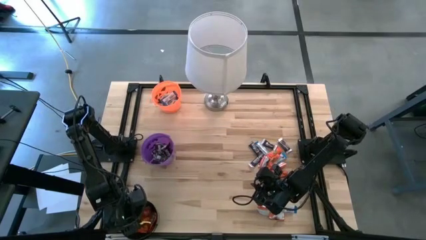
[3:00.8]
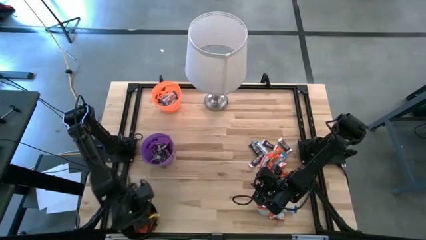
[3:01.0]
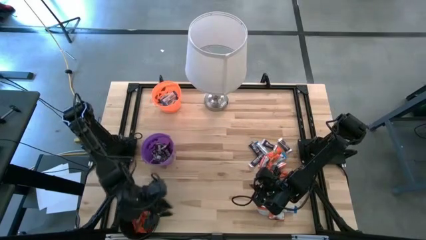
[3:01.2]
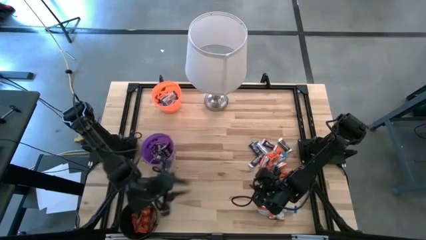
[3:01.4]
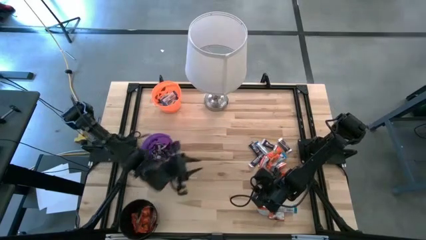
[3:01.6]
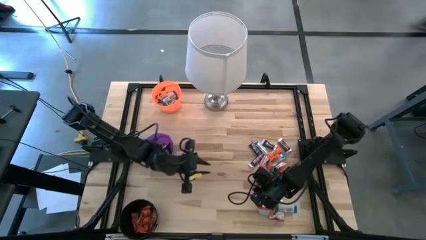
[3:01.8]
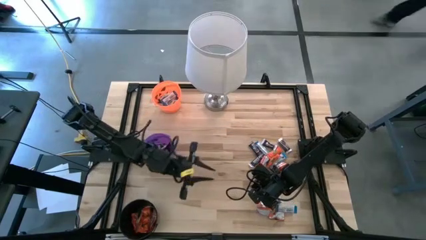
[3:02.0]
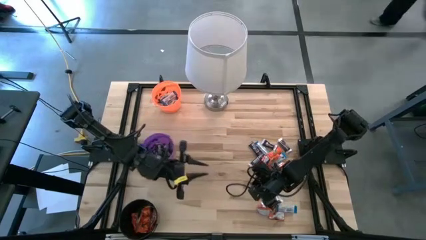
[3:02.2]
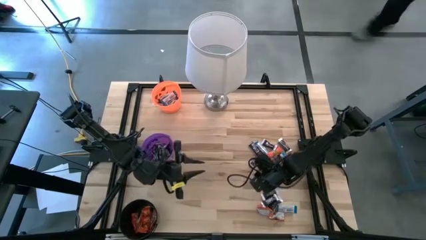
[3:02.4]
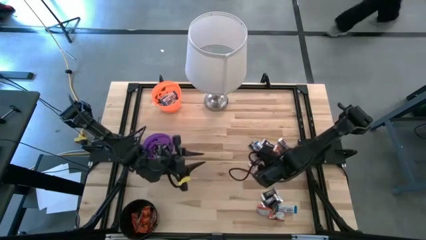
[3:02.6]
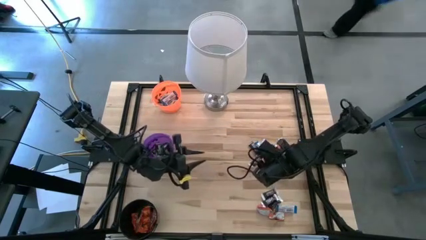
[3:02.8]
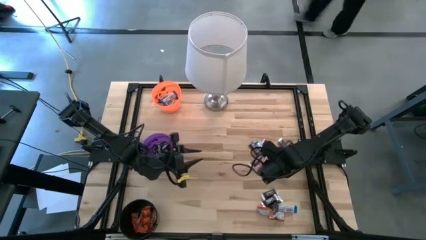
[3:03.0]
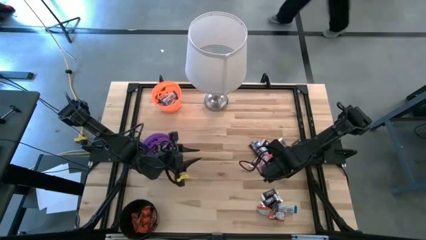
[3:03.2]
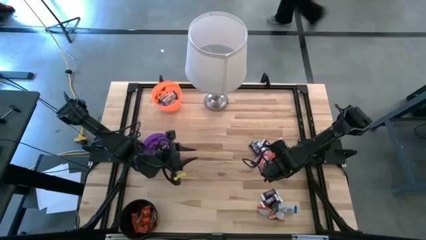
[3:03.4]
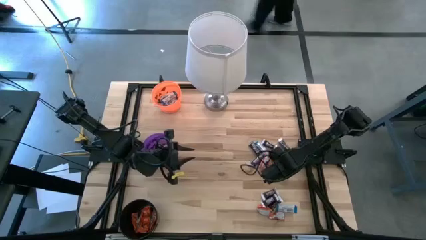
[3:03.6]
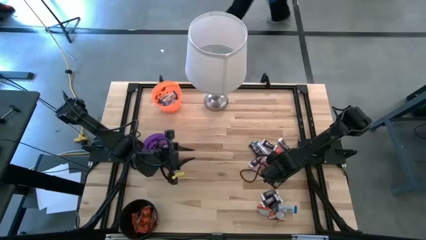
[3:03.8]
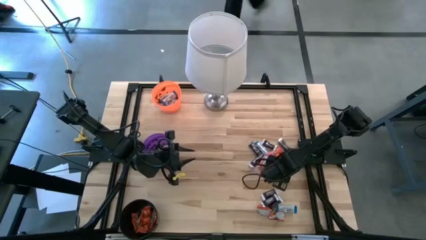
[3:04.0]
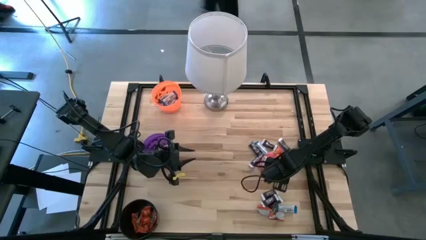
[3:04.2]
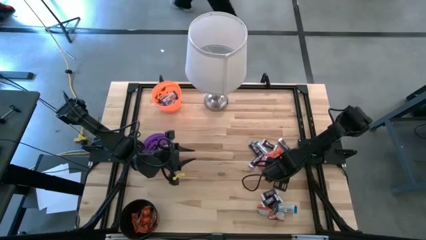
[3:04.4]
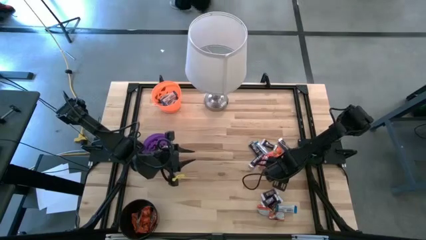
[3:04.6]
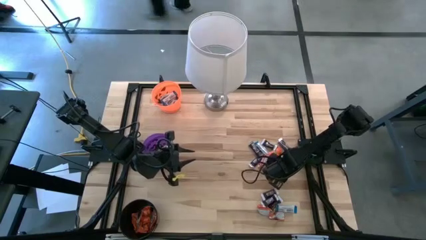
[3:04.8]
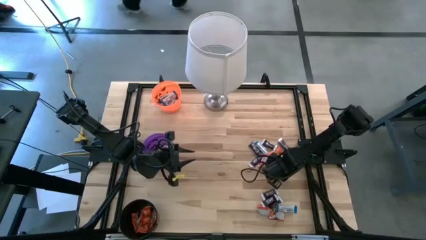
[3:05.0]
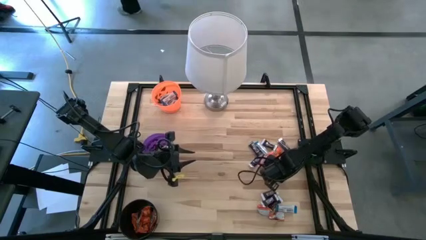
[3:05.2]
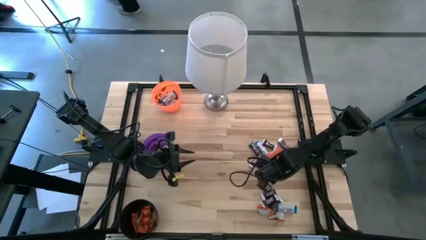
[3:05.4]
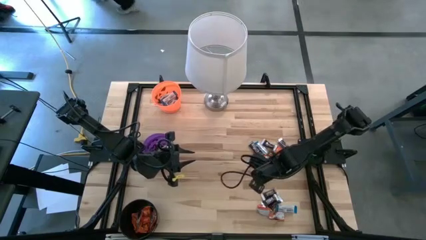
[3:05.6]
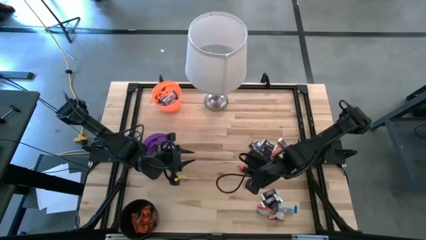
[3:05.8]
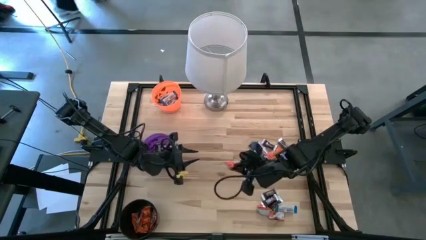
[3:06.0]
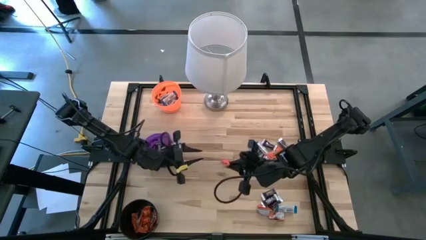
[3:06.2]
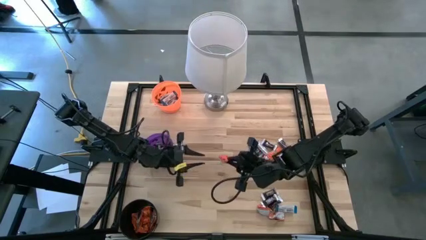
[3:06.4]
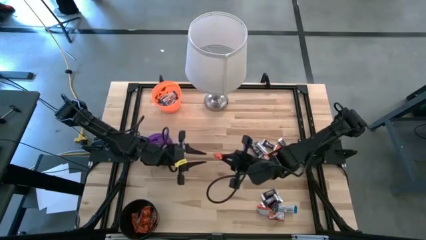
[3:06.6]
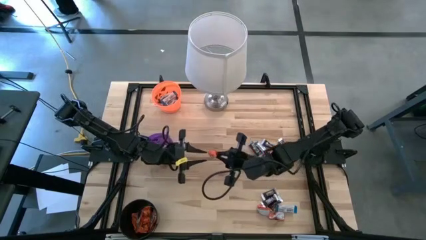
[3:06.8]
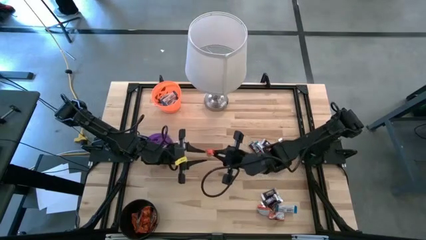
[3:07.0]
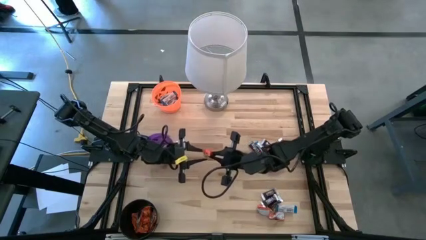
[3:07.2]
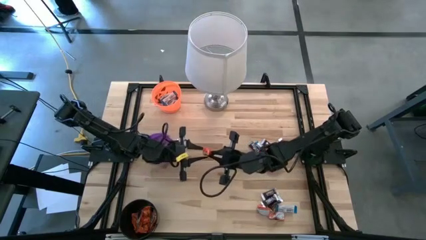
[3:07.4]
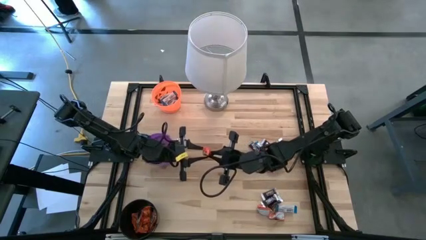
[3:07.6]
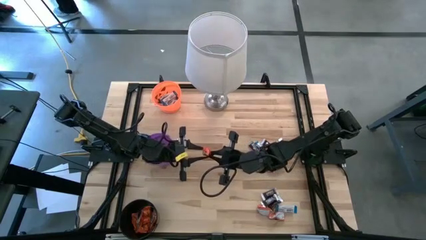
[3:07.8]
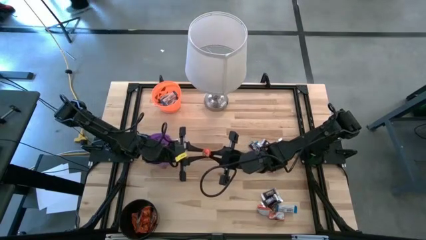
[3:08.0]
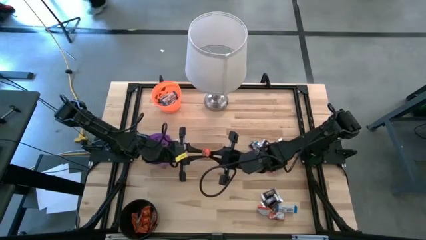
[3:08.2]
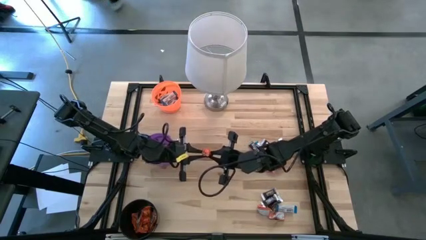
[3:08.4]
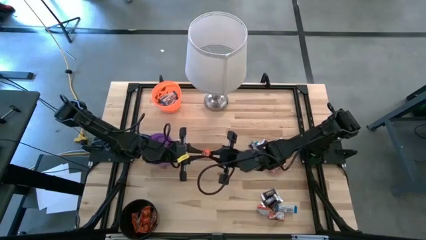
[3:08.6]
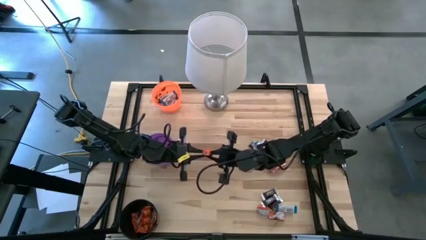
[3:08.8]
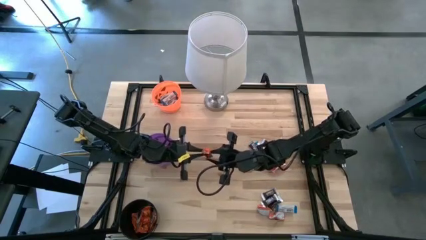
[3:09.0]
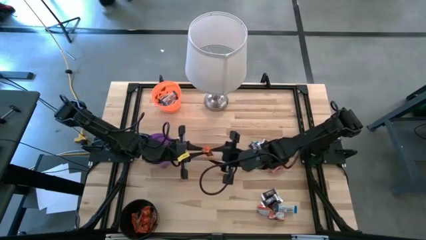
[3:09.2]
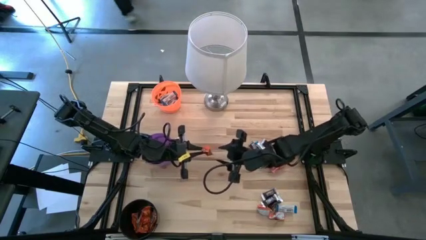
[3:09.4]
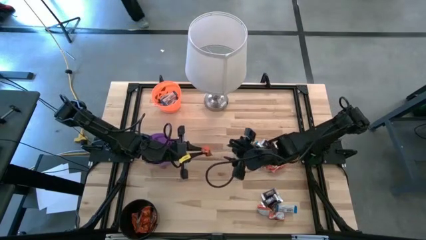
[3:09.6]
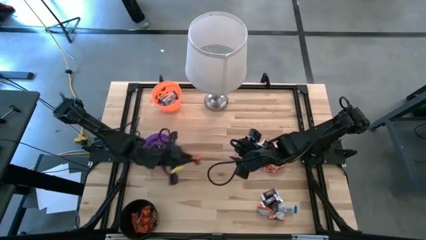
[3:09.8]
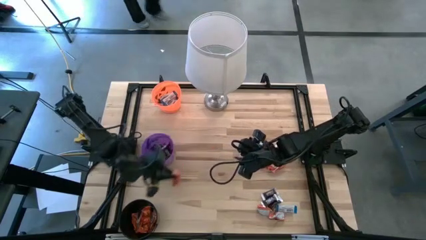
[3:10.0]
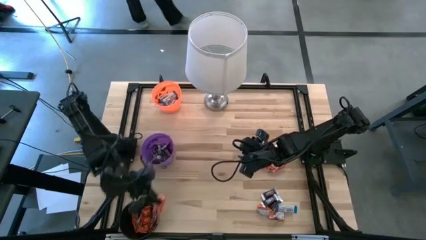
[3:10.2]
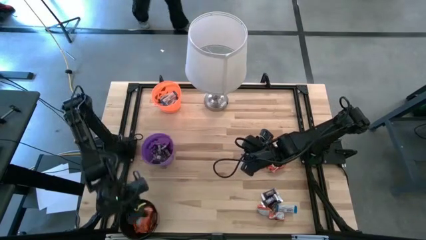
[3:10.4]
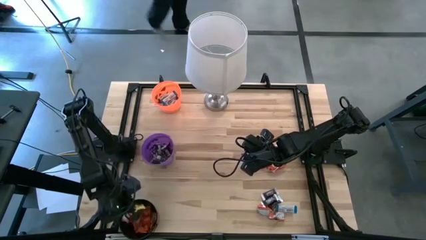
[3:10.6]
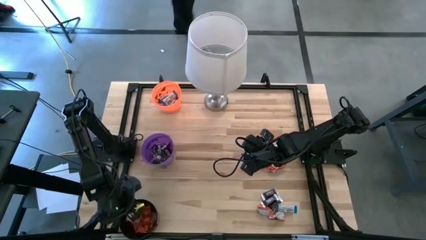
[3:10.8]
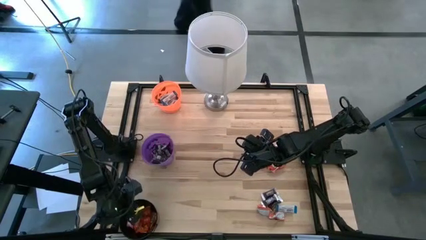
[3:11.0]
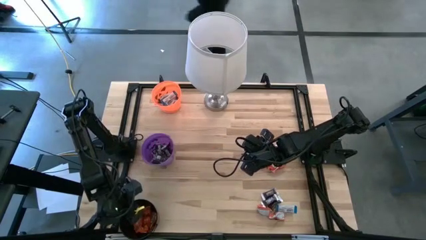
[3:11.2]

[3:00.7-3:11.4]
Task: Sort candy
Put the orange chocolate into the black bucket

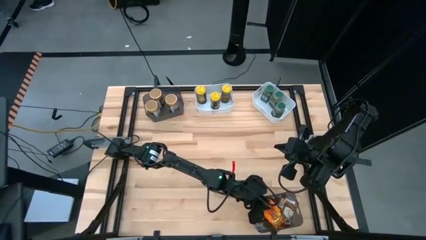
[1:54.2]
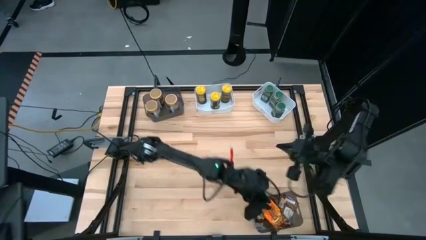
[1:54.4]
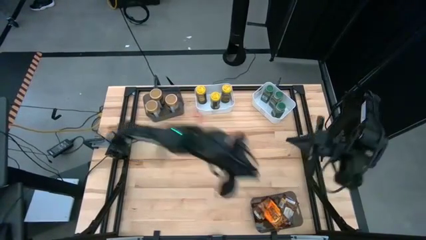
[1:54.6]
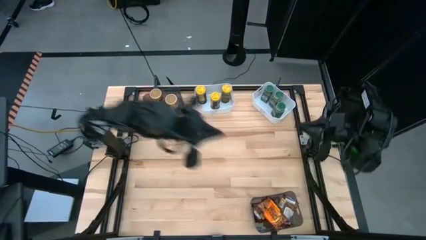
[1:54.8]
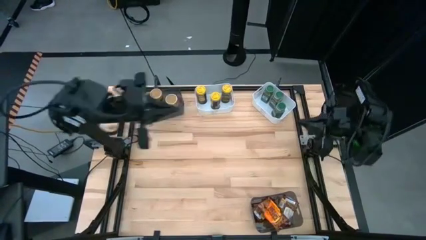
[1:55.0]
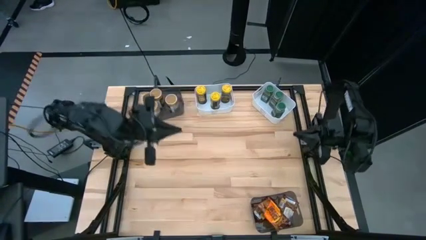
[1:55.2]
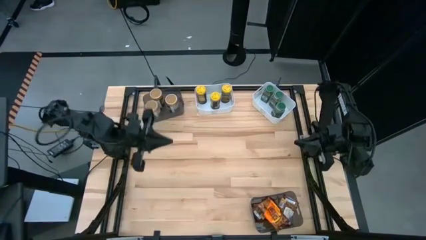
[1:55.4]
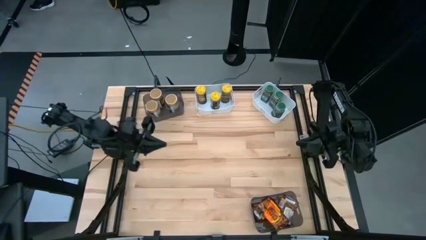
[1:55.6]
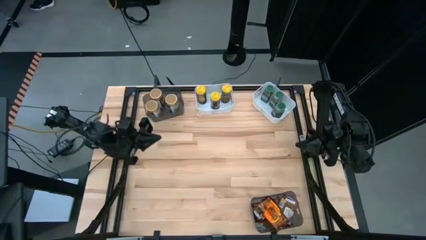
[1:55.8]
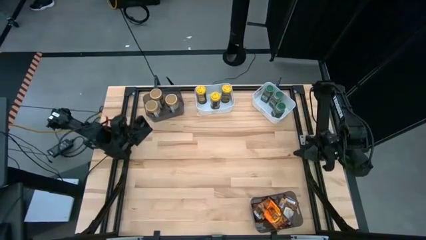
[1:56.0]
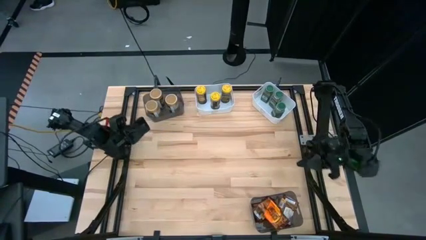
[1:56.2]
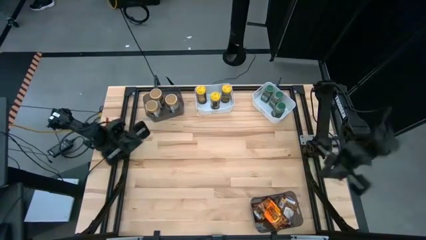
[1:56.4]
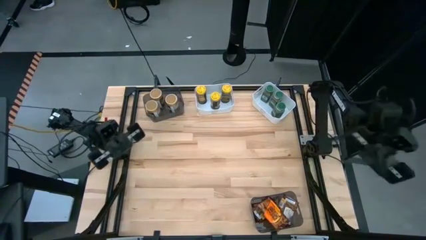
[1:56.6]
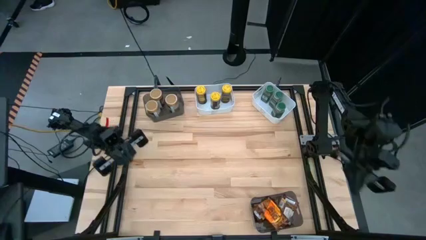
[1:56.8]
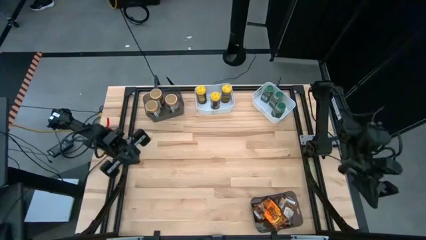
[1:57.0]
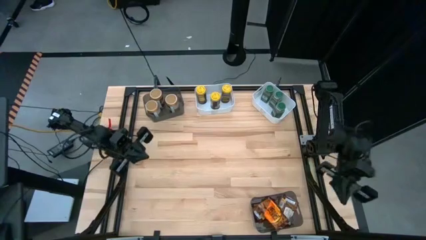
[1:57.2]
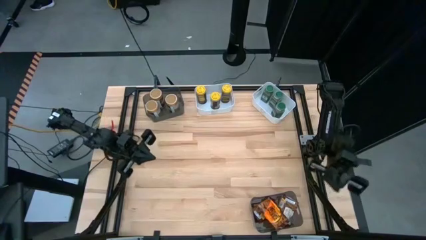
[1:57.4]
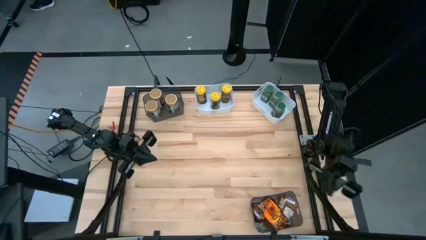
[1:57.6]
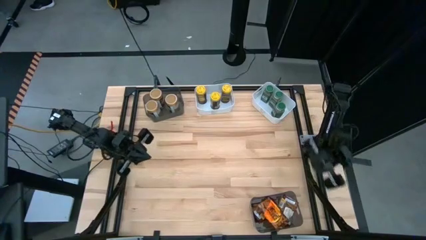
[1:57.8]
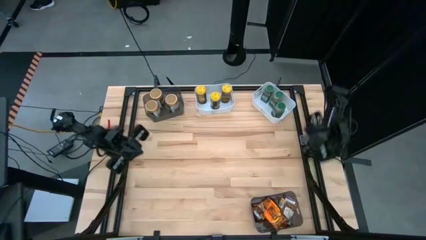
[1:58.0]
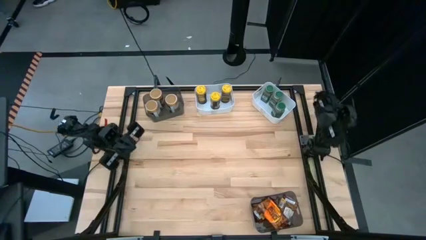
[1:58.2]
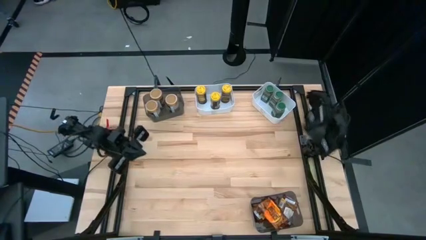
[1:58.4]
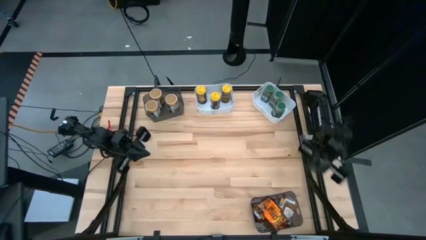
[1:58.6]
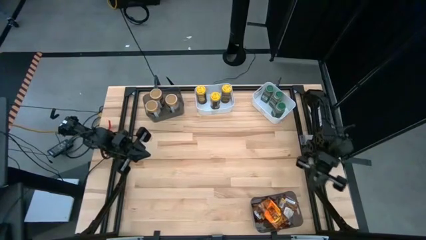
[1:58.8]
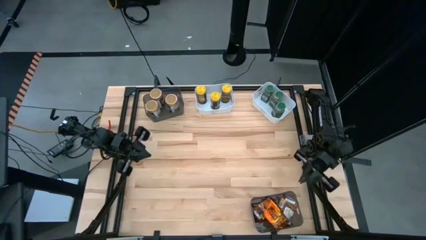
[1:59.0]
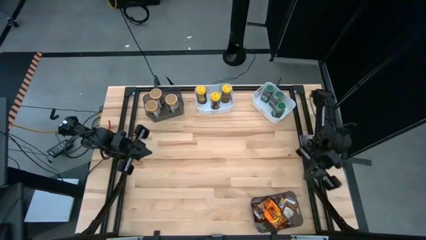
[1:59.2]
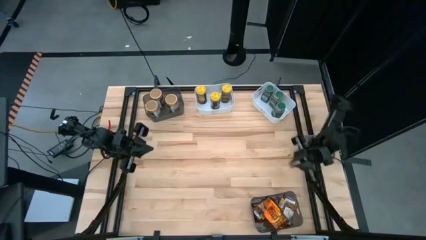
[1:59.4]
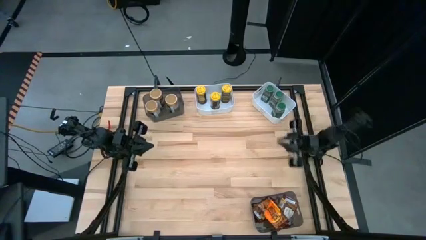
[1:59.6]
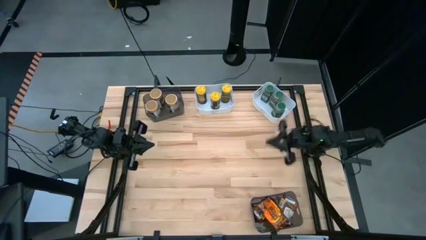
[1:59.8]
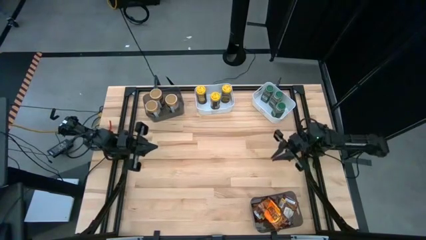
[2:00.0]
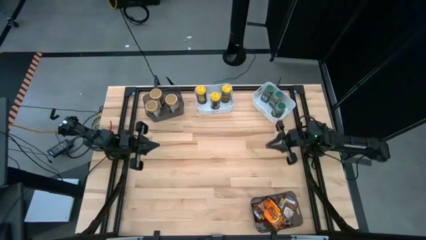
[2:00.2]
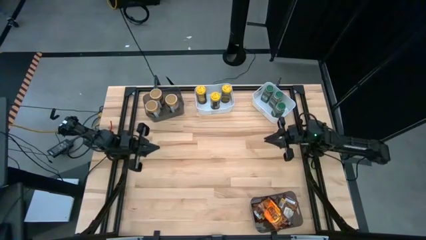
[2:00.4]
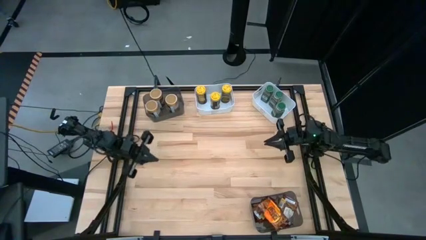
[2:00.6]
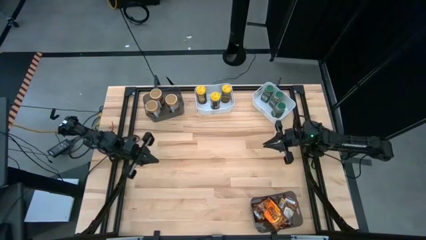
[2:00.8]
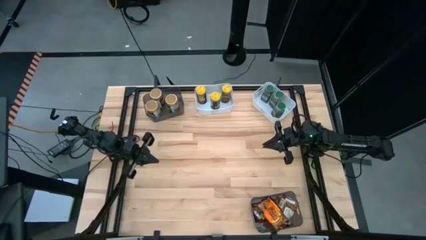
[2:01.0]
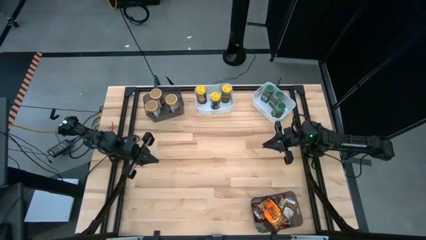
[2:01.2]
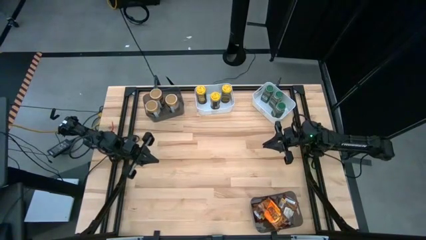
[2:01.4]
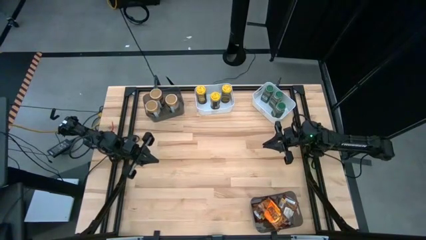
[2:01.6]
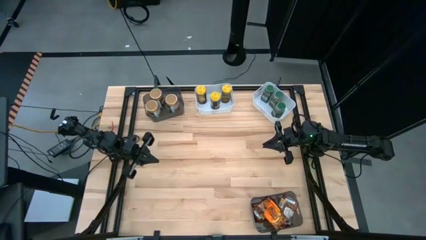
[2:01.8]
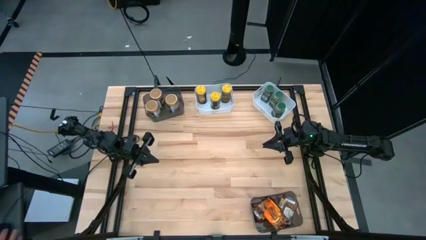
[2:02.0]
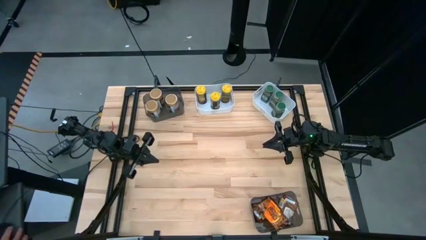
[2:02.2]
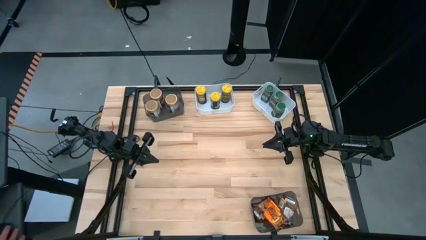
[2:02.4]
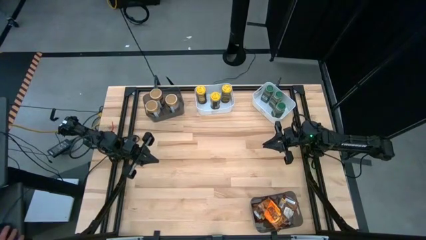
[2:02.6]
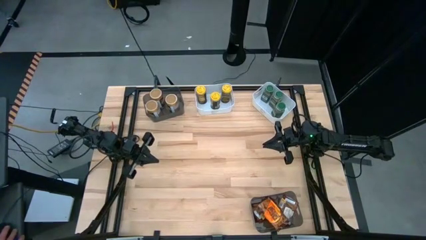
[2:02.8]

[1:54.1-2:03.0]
Task: Sort spices by type
Return to Home Position
